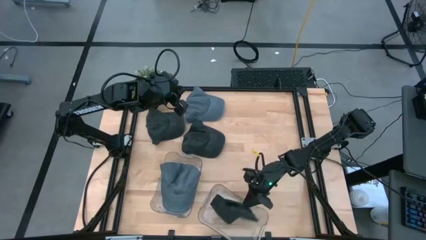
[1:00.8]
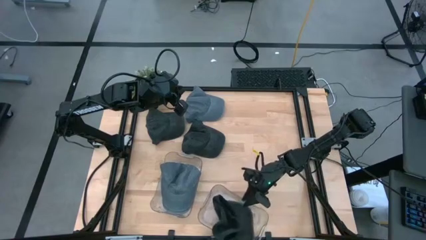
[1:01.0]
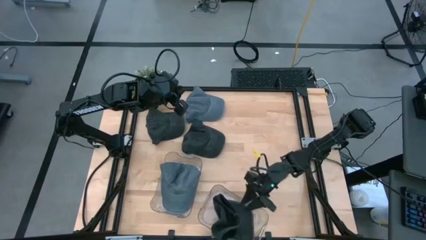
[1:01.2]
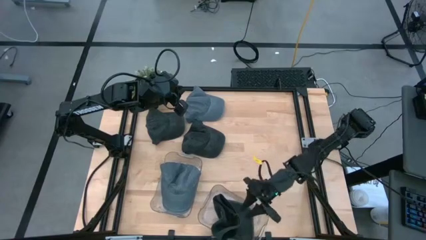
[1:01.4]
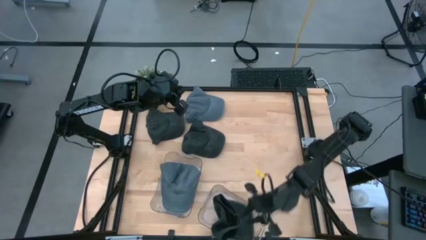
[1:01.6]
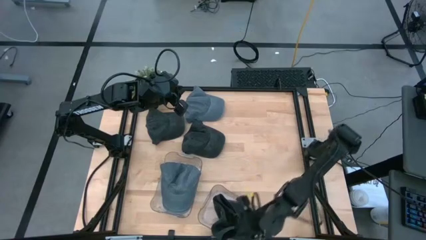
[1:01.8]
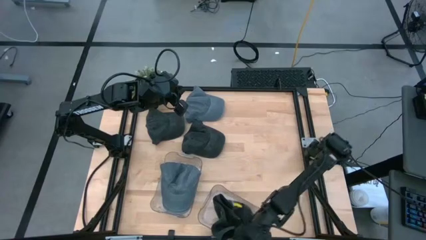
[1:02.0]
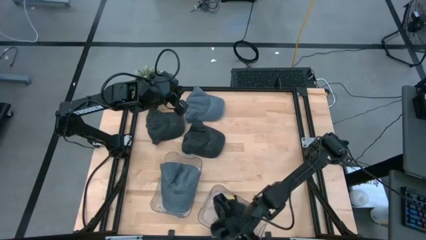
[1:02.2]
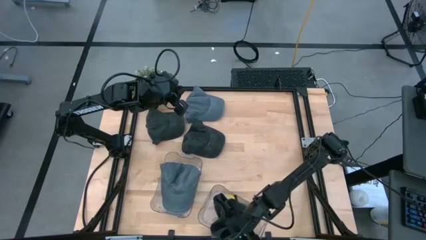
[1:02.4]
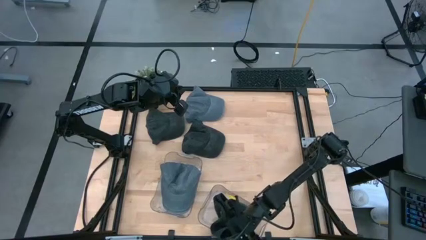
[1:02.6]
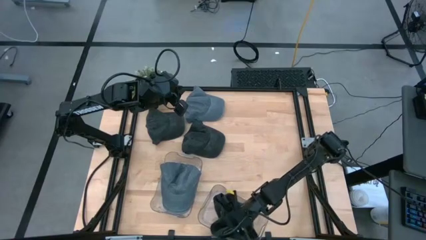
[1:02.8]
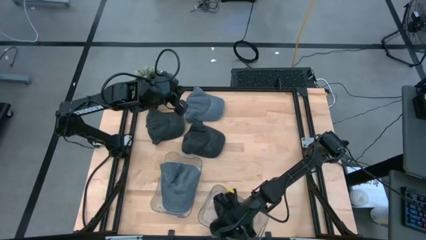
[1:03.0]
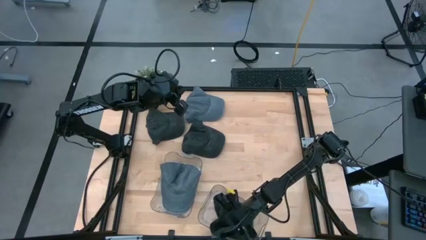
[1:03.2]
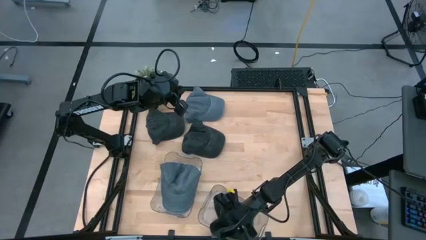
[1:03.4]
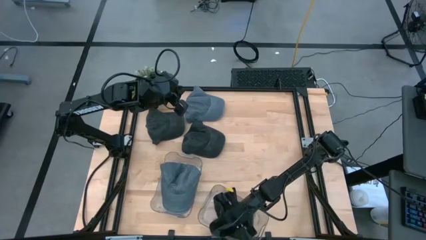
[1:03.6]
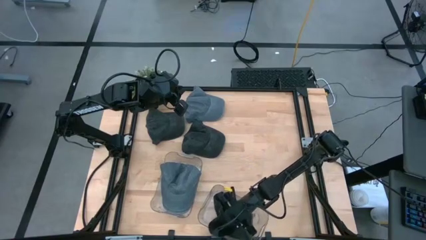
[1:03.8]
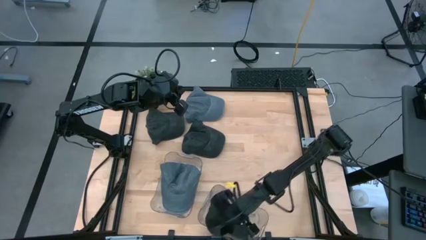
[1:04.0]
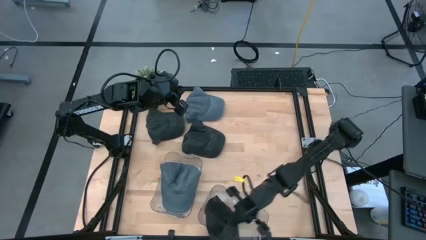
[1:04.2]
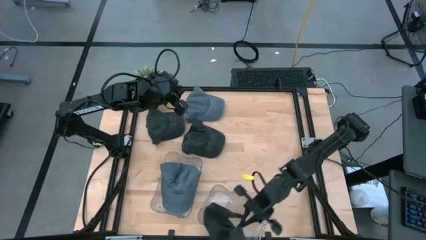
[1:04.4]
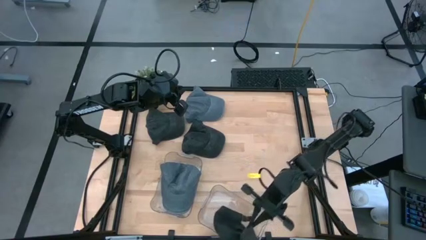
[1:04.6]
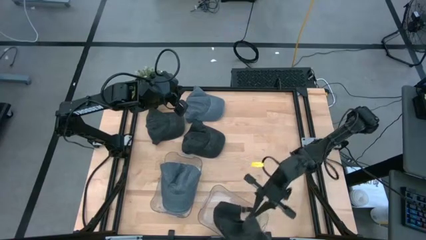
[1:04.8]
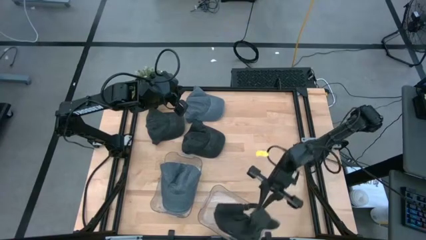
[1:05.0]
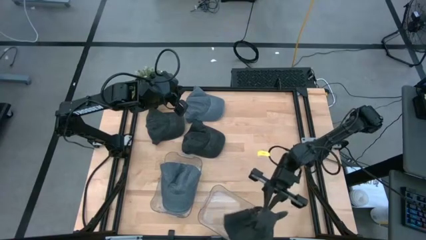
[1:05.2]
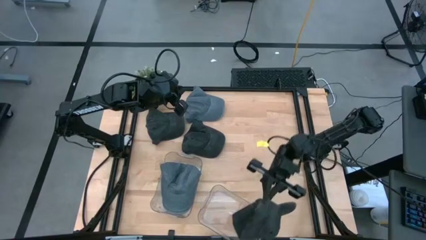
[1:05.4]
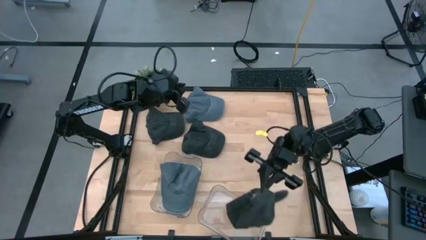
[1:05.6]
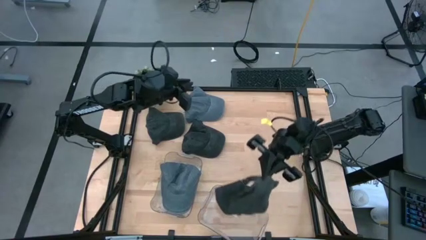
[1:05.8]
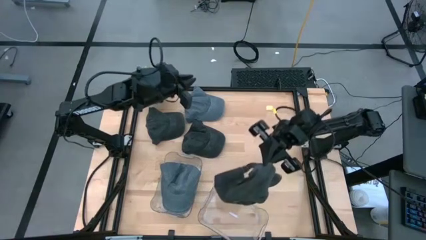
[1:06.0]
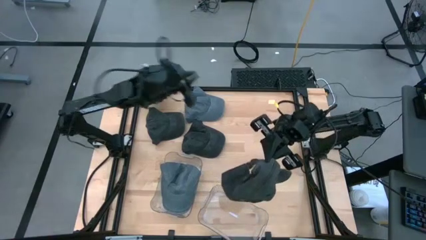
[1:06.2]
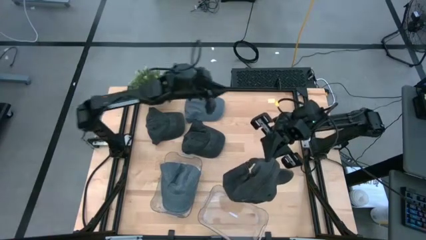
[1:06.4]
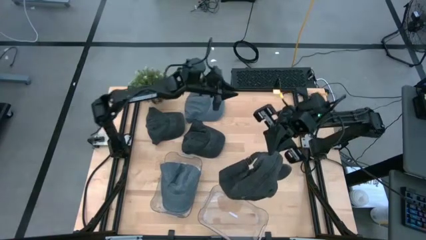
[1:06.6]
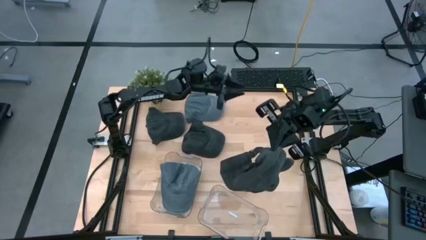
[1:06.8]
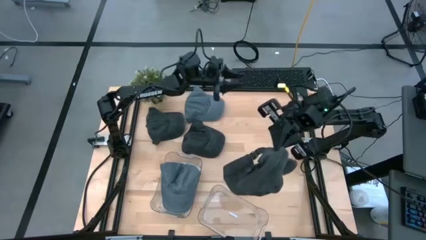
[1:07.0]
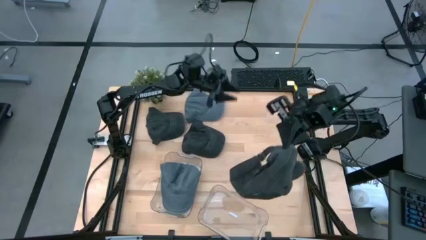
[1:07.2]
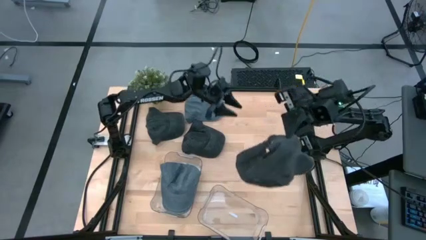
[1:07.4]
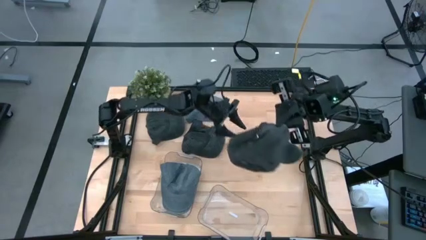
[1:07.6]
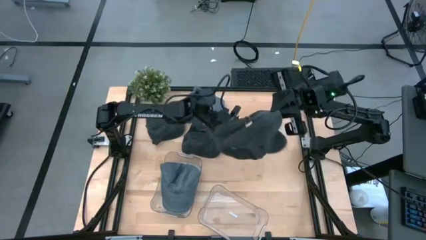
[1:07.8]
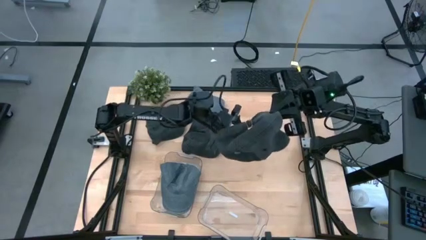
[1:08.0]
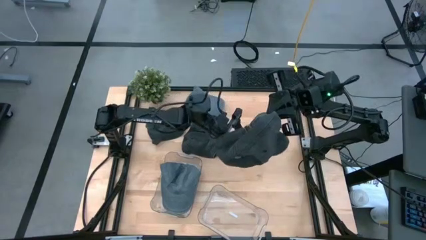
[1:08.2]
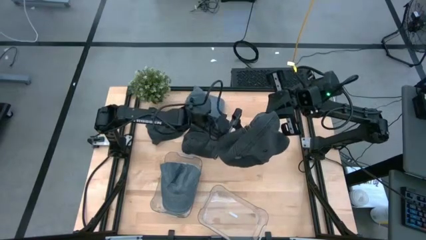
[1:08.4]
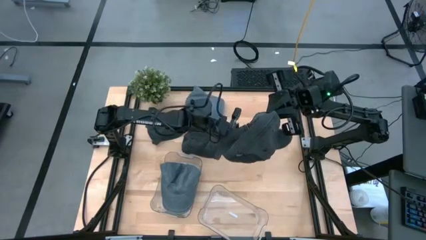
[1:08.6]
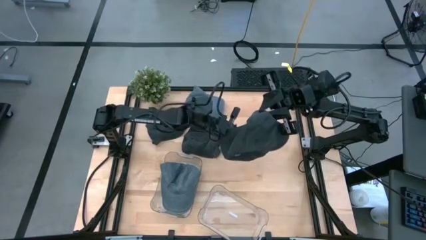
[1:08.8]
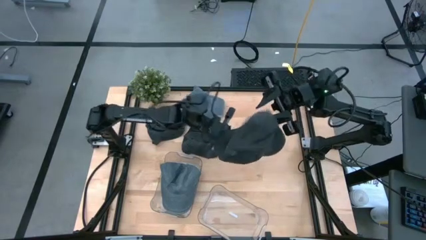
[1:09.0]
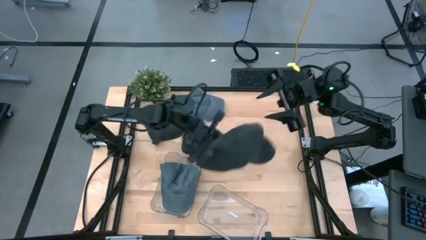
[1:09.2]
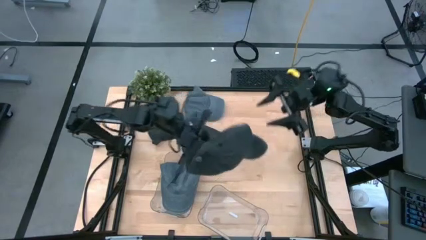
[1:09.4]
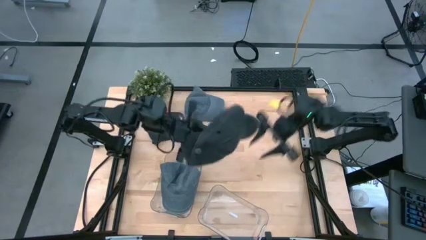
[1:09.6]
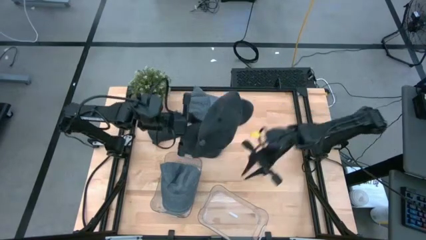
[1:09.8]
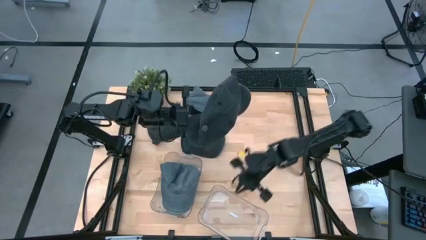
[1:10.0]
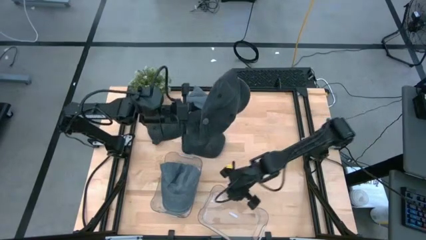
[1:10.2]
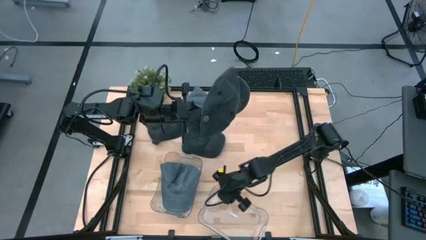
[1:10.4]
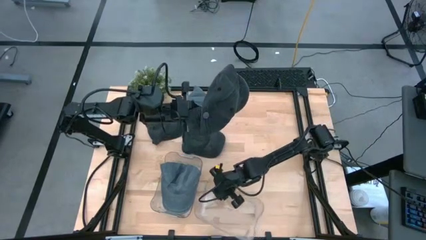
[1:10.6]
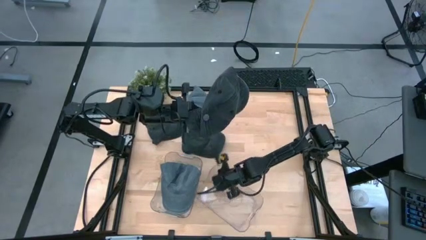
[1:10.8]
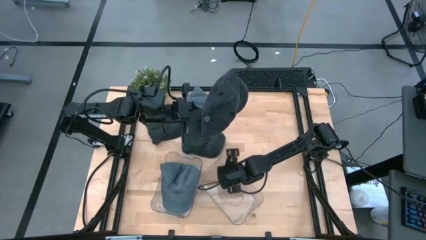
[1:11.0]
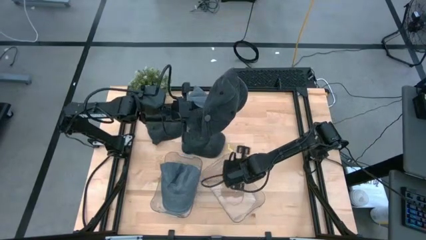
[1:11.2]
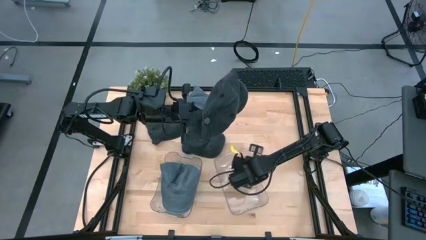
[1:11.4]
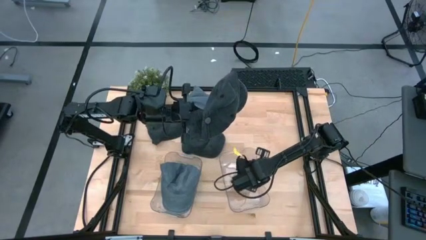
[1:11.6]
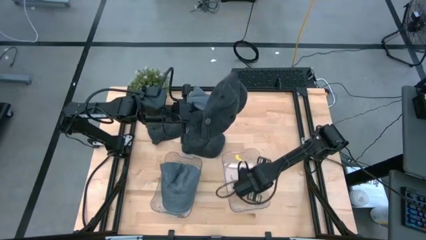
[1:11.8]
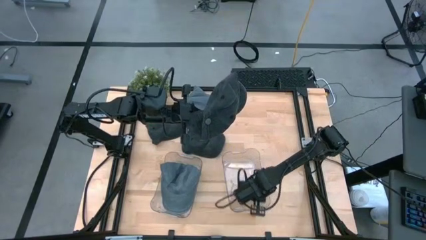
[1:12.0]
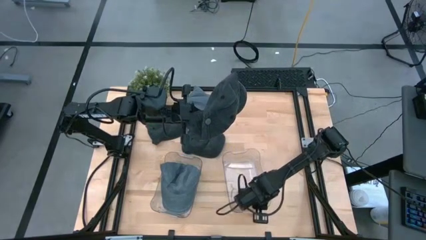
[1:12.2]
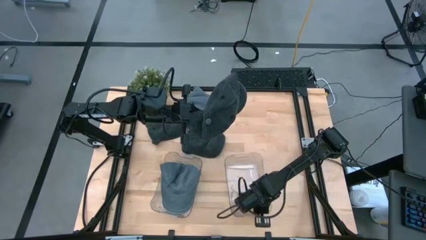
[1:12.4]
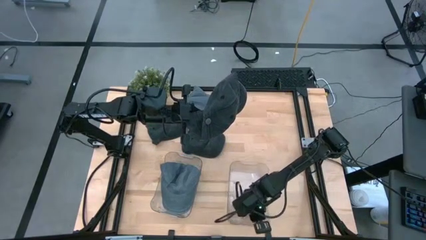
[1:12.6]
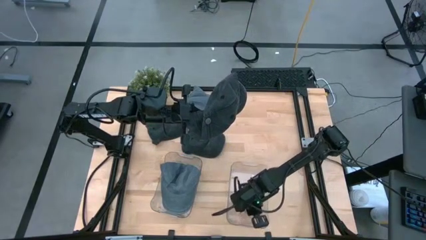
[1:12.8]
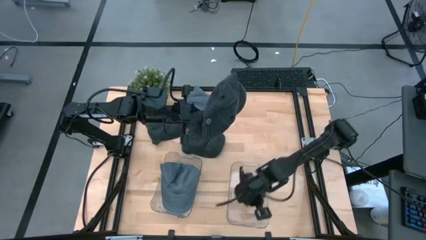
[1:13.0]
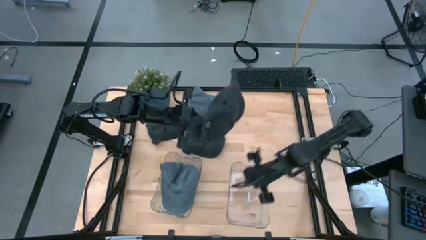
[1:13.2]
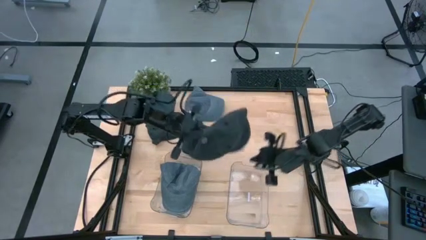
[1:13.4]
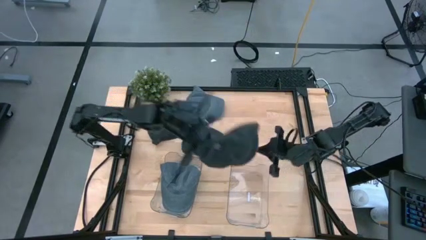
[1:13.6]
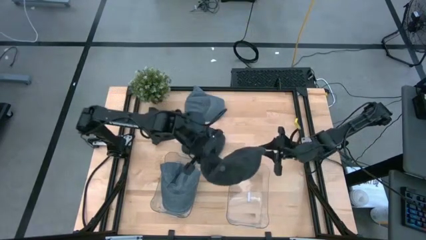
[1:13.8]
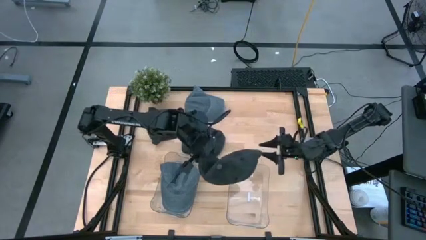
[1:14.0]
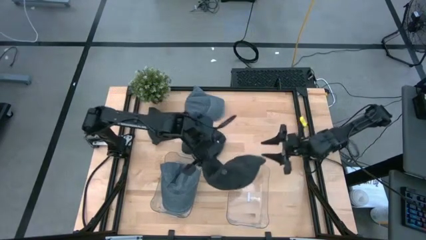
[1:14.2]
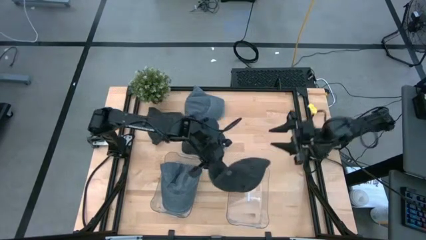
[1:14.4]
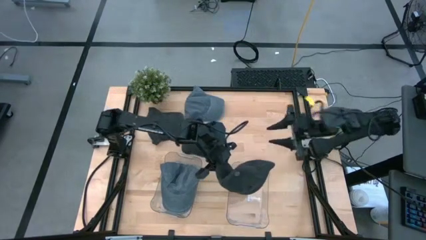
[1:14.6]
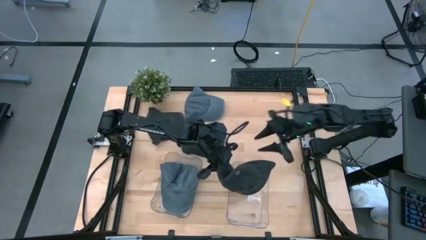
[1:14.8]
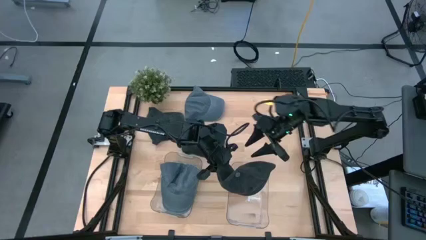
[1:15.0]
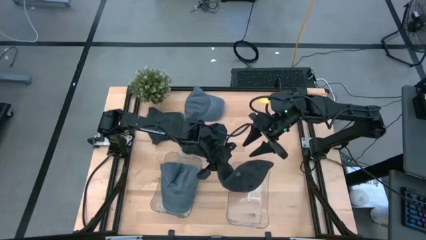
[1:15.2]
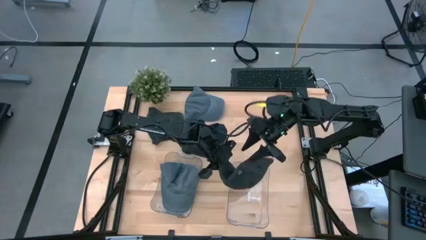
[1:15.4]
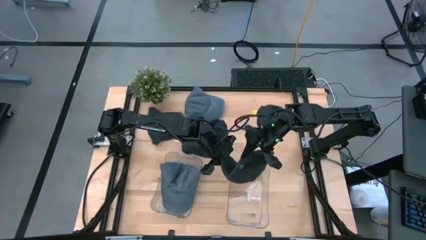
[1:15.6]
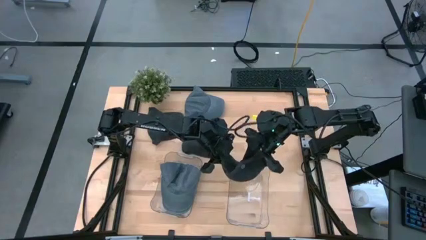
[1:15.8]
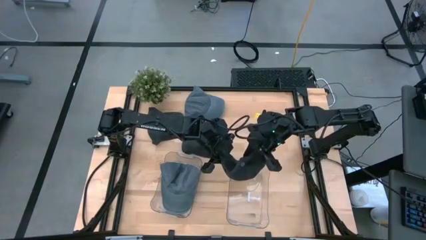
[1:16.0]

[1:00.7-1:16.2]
Task: Pick & Place hat
Put the top right black cap into the right transparent bin
